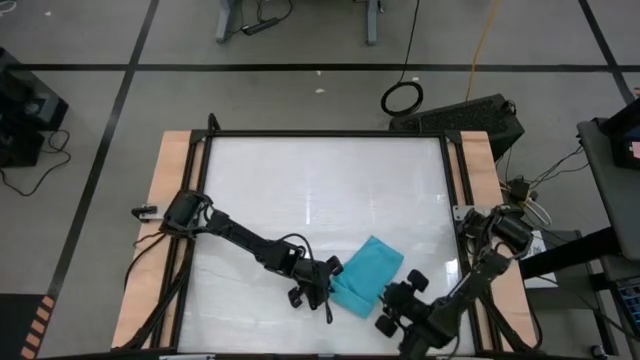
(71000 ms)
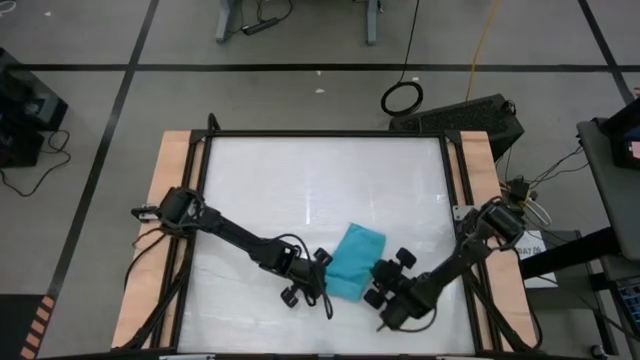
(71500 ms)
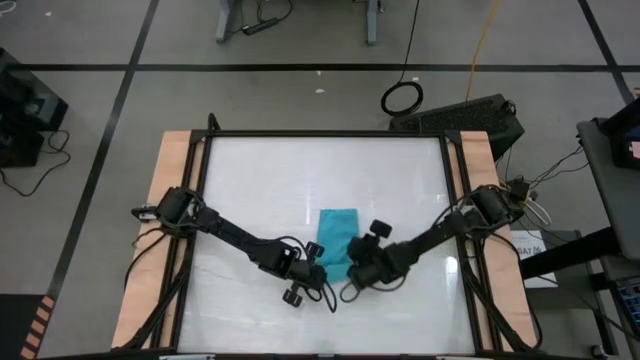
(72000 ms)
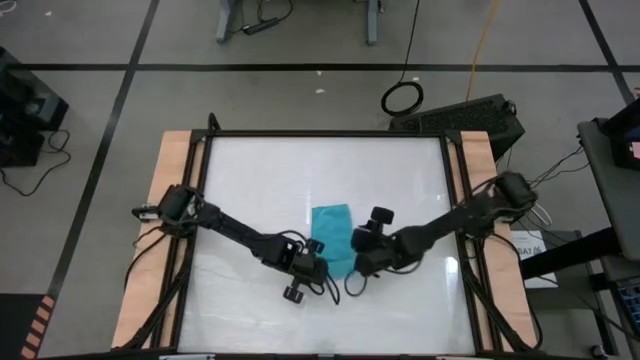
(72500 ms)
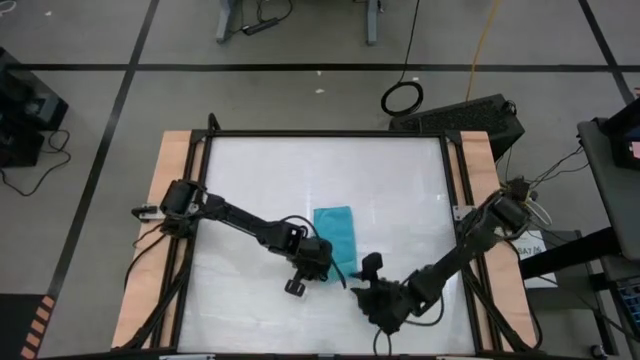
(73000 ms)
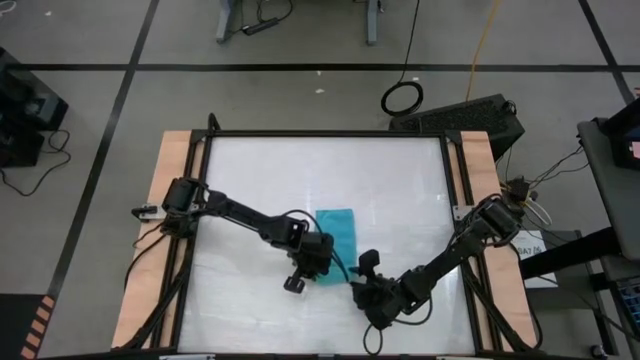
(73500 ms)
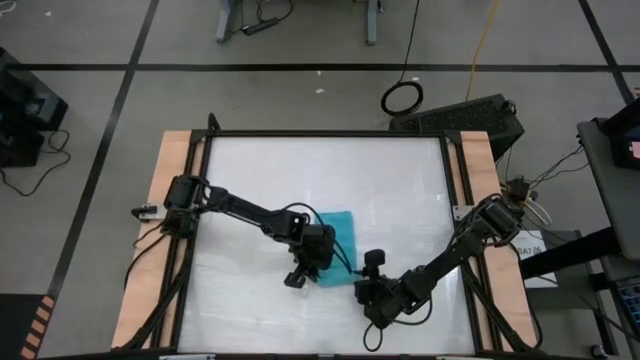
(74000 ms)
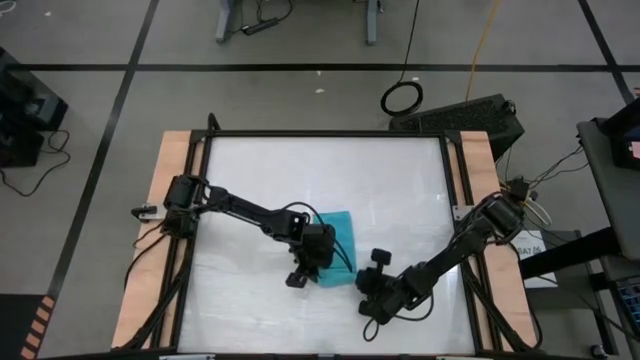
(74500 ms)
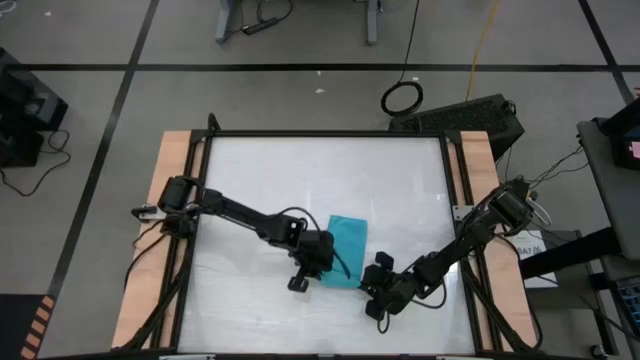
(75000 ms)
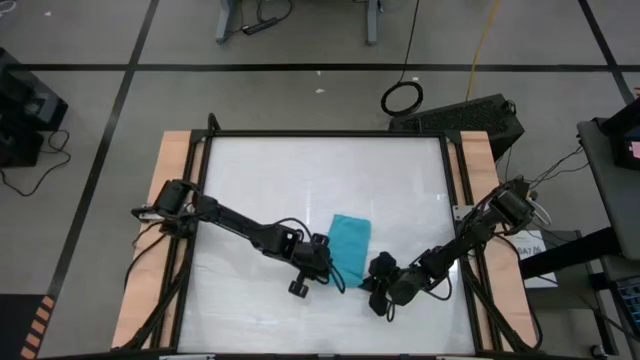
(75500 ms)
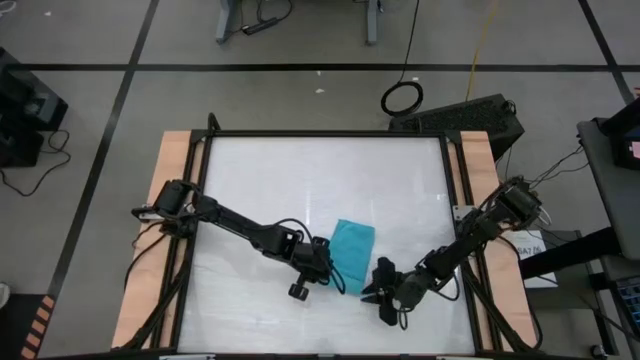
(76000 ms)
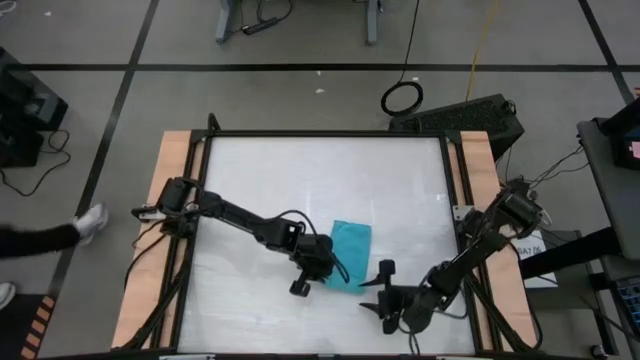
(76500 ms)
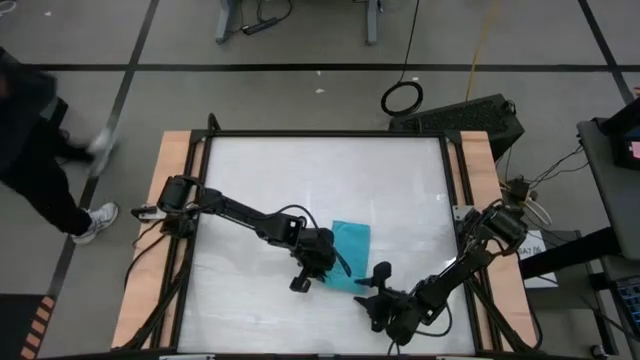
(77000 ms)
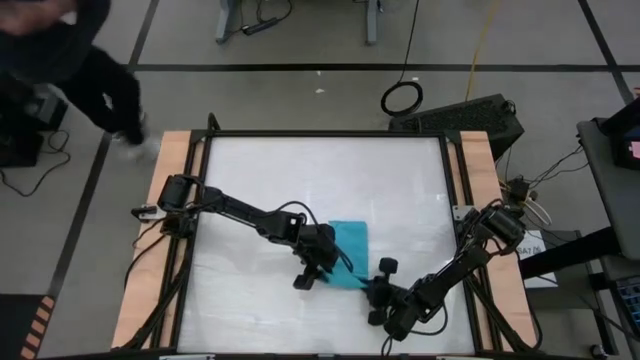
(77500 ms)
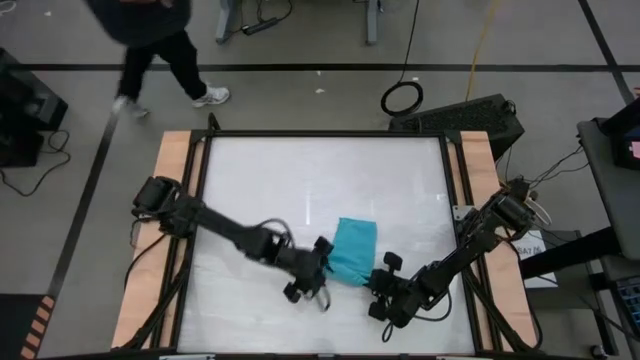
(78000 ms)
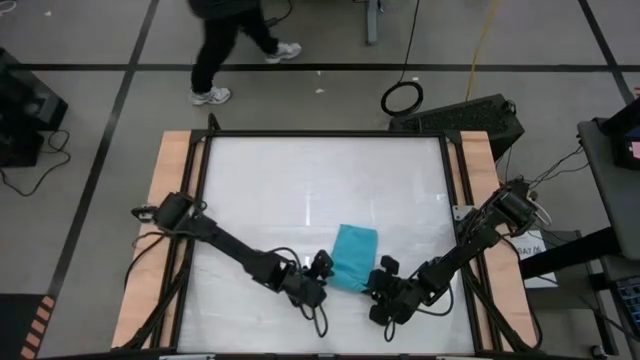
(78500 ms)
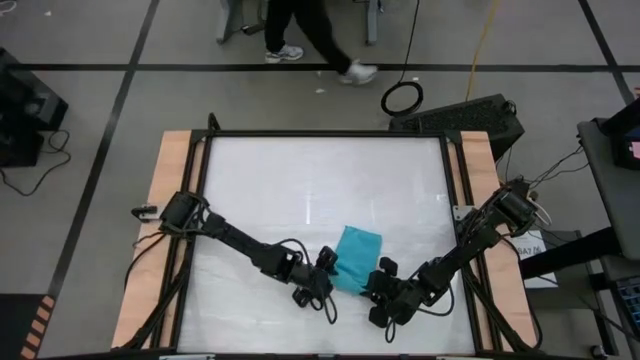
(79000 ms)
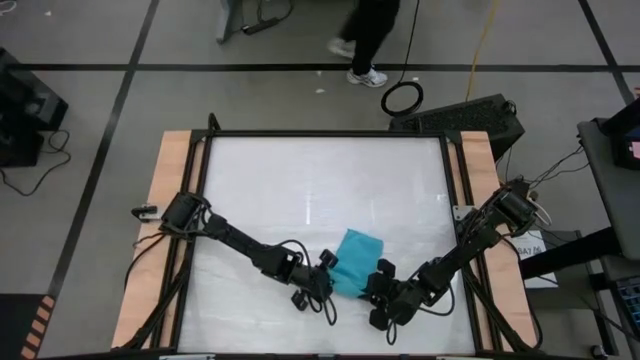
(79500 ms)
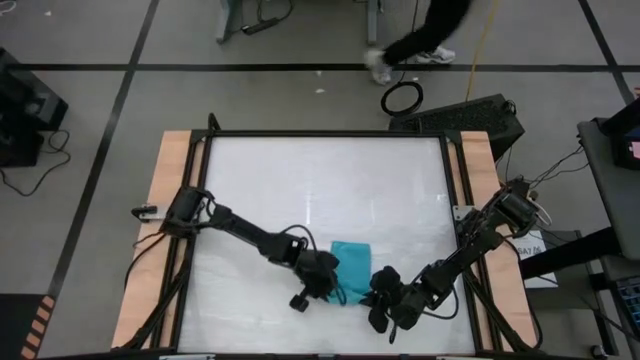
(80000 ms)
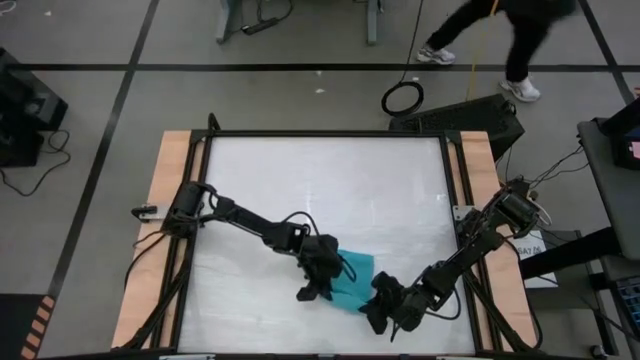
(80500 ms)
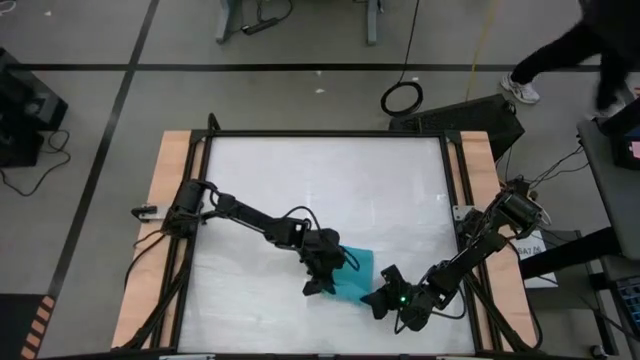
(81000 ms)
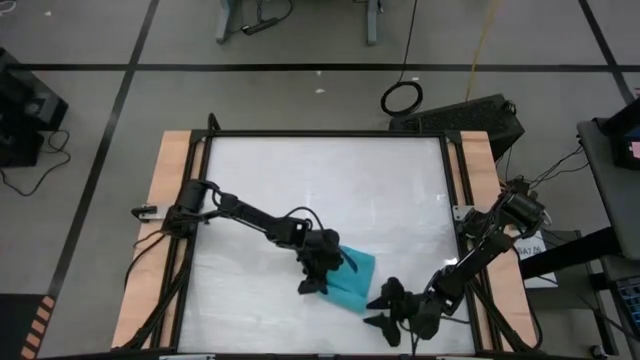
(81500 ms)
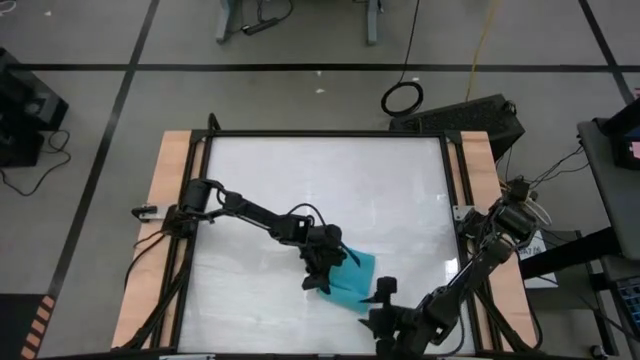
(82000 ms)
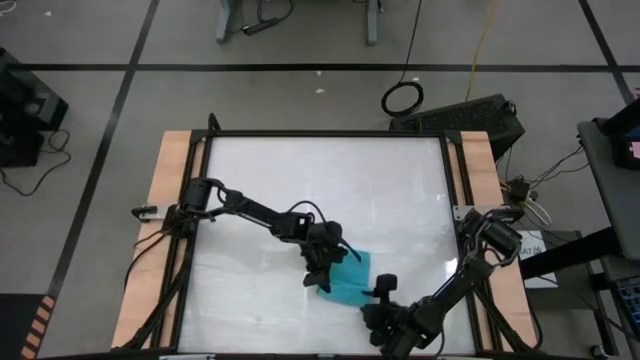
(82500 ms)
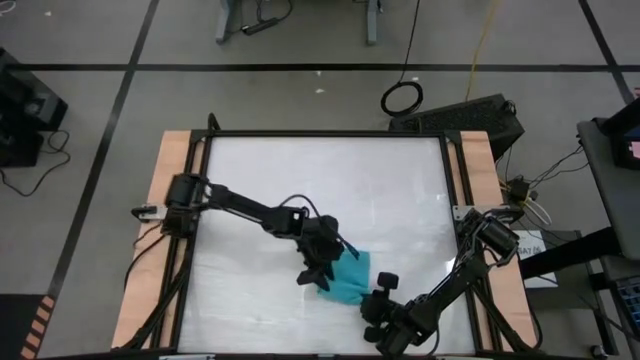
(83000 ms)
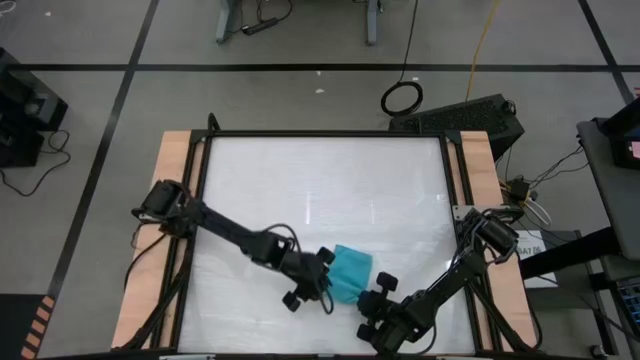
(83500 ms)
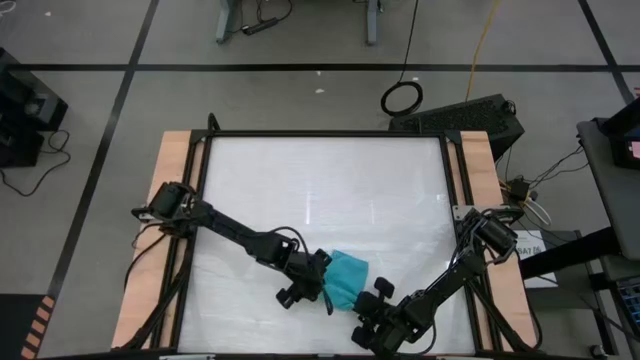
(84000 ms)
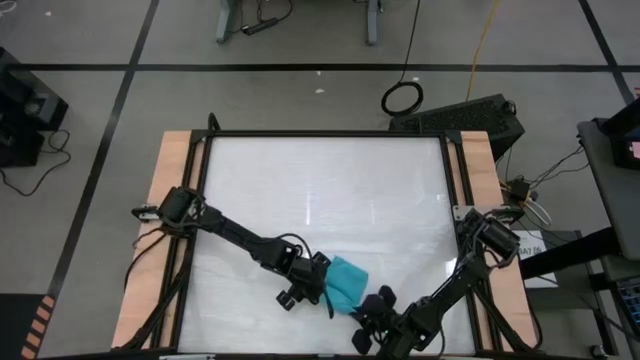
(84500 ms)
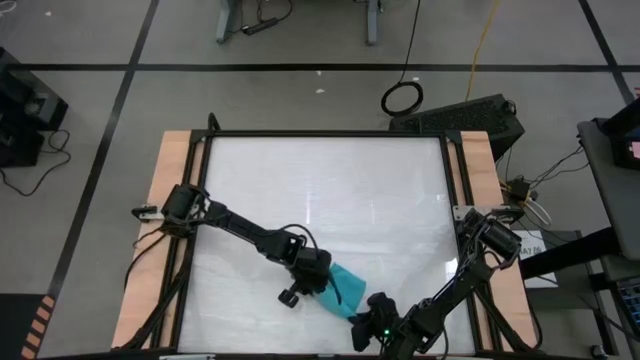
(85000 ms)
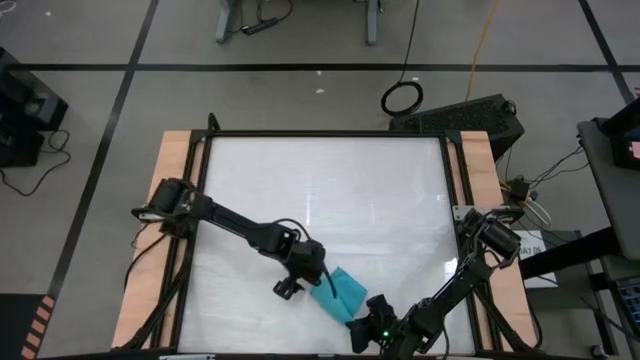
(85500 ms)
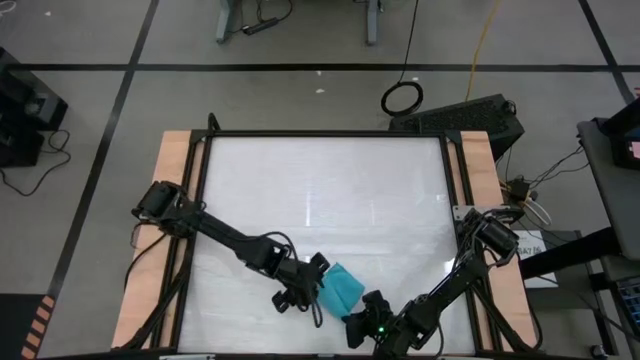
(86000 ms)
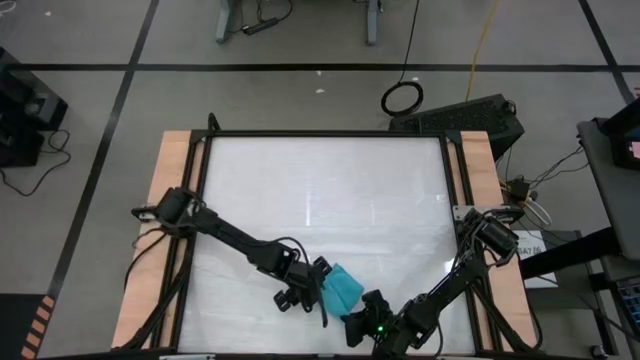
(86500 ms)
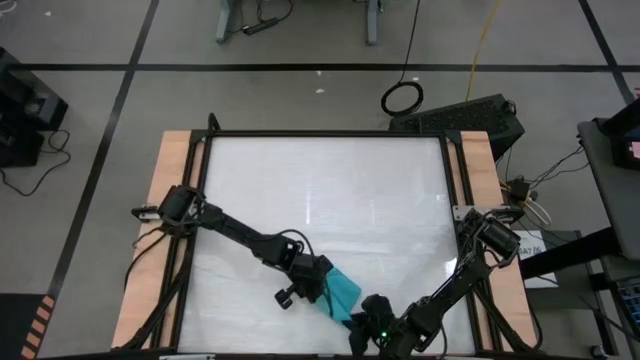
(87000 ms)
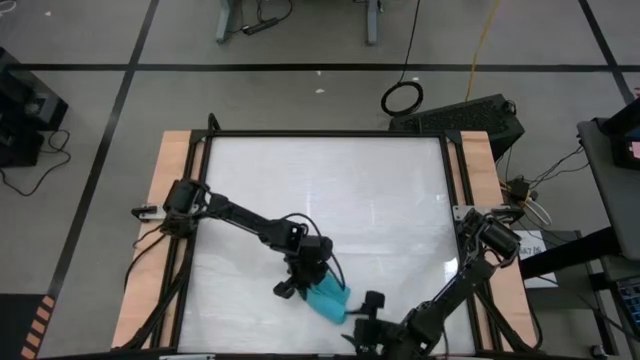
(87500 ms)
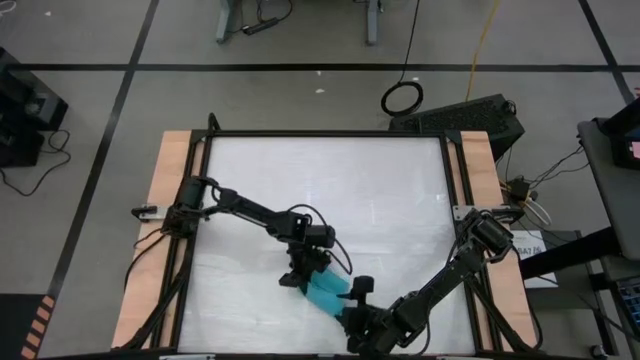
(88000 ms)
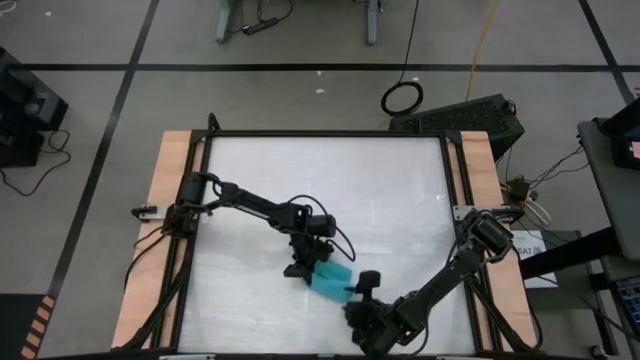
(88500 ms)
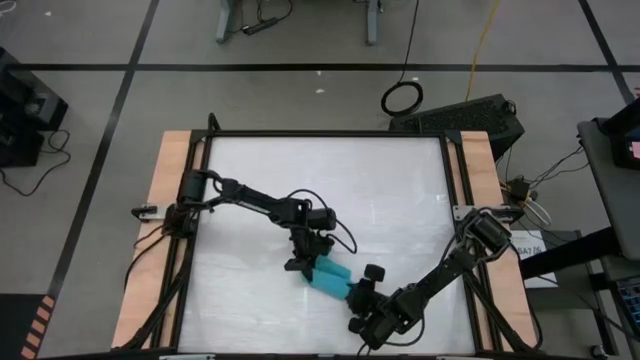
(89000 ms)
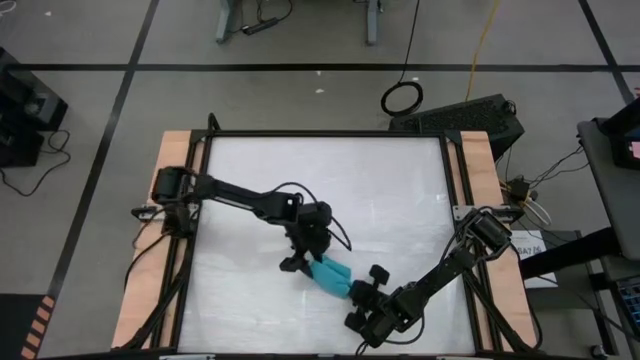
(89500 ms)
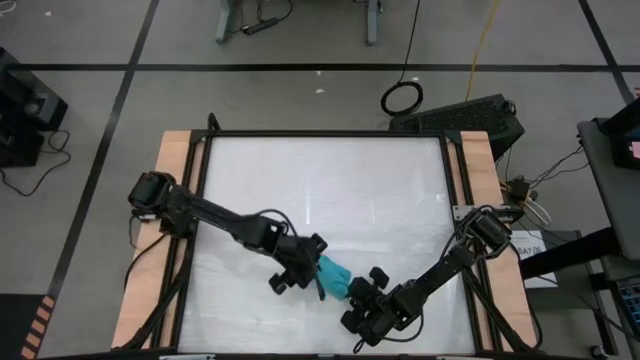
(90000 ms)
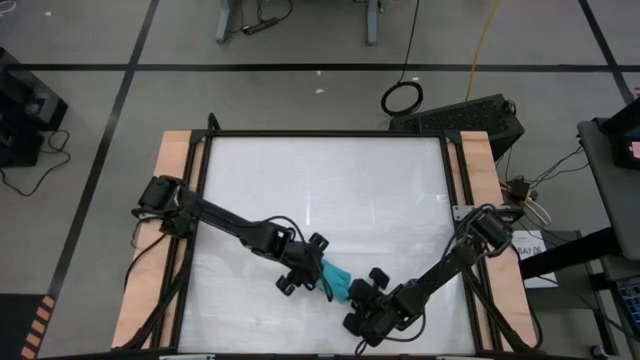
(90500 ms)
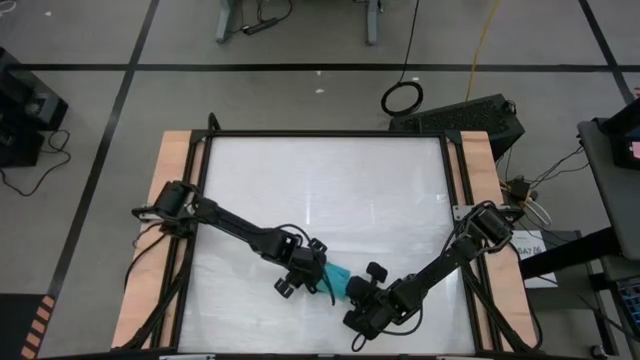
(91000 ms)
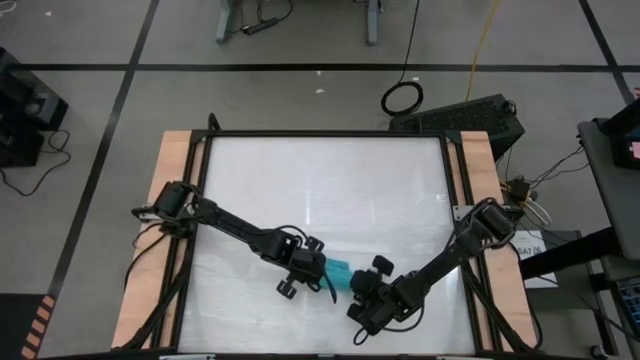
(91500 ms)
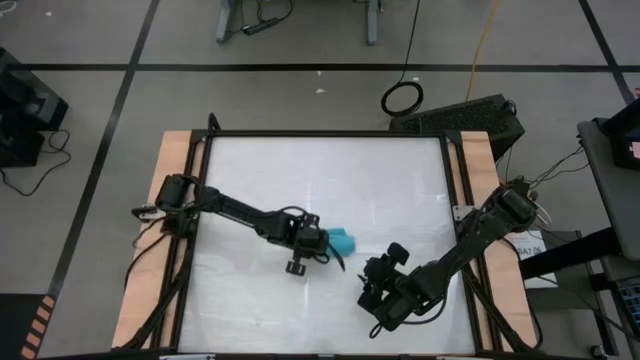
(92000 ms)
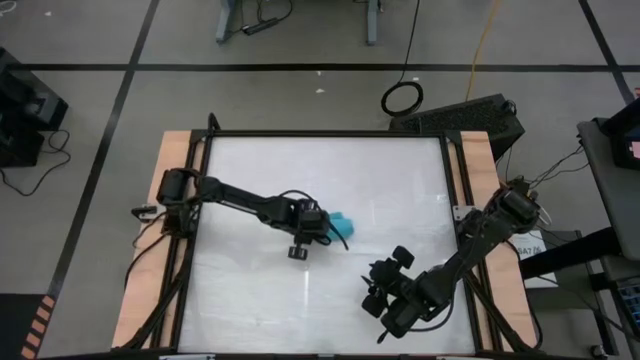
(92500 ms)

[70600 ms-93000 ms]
Task: Roll towel
Roll the blue microfiber cloth
